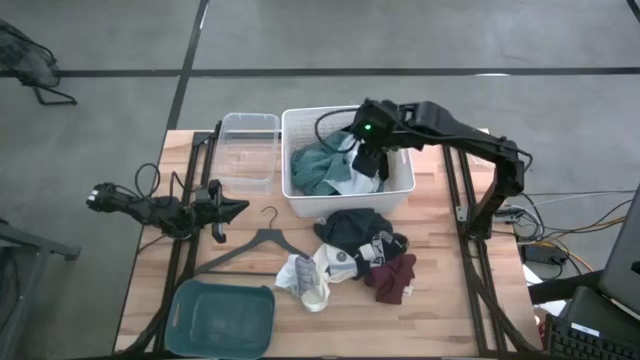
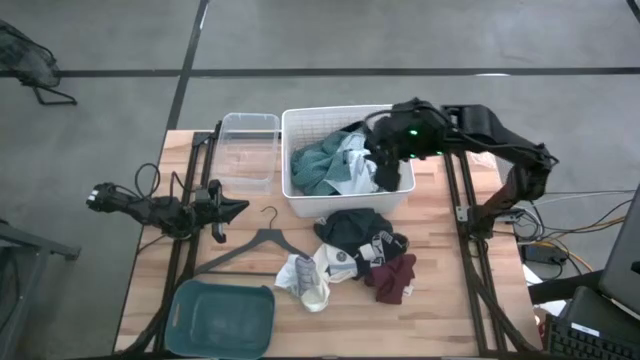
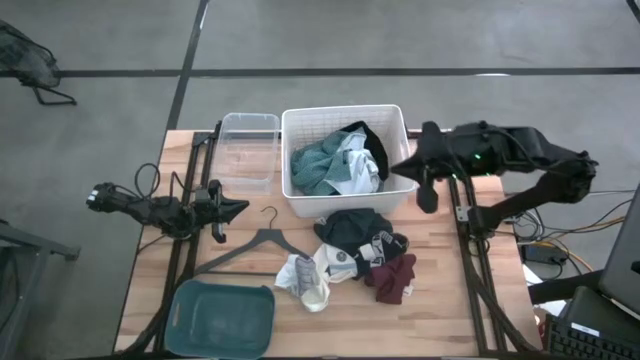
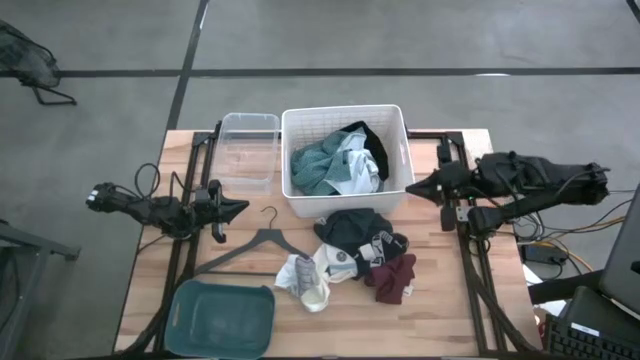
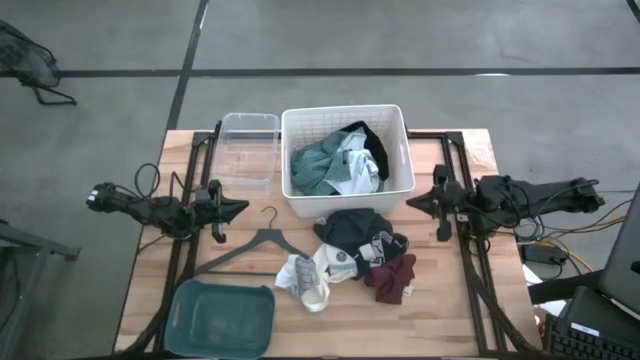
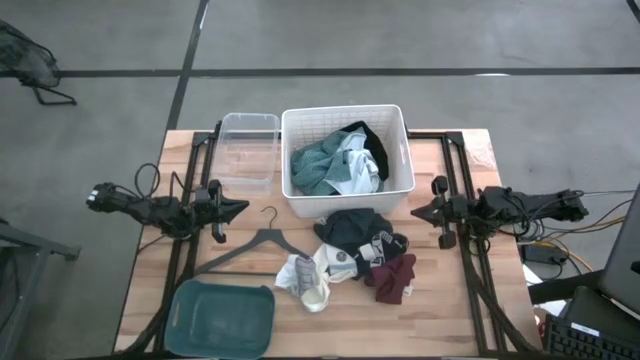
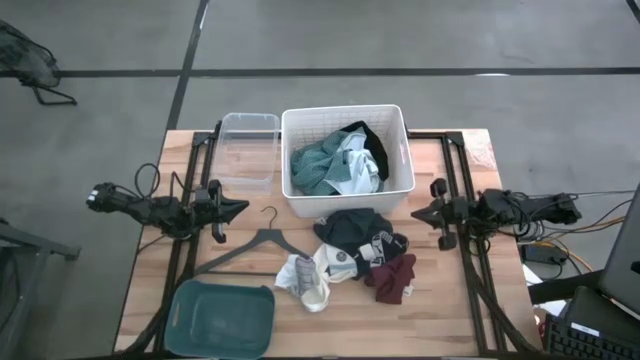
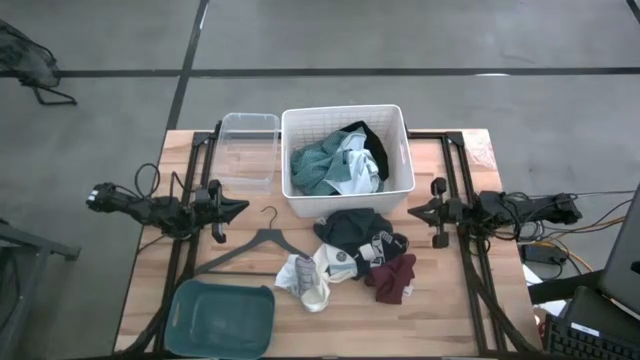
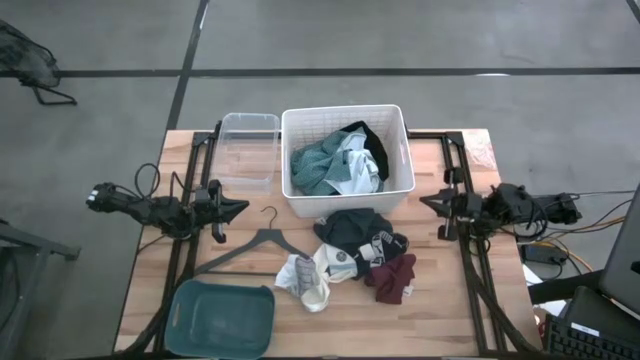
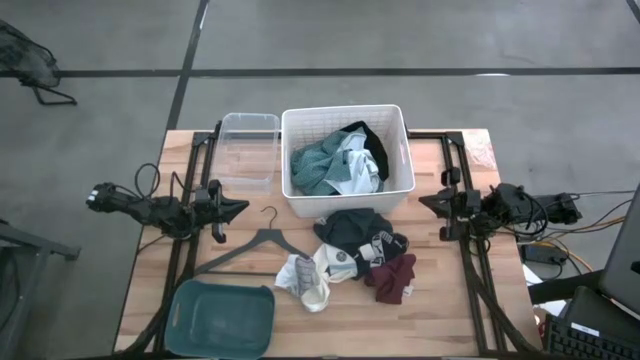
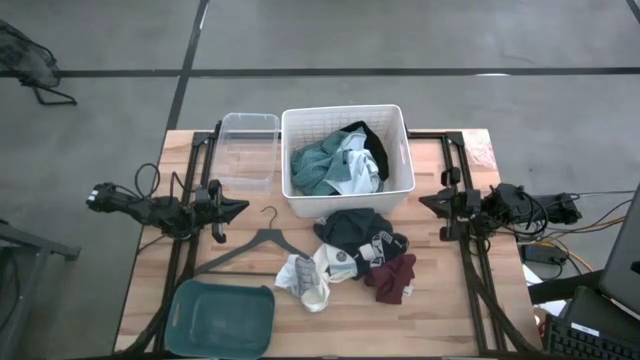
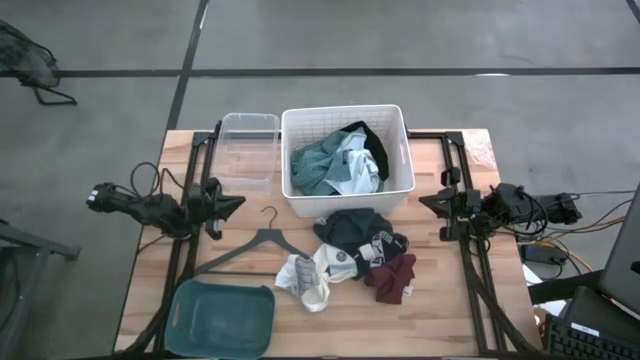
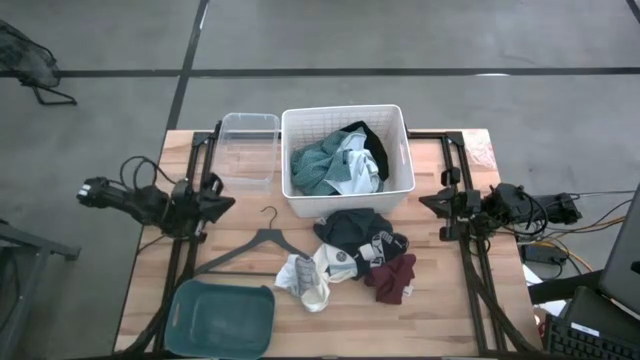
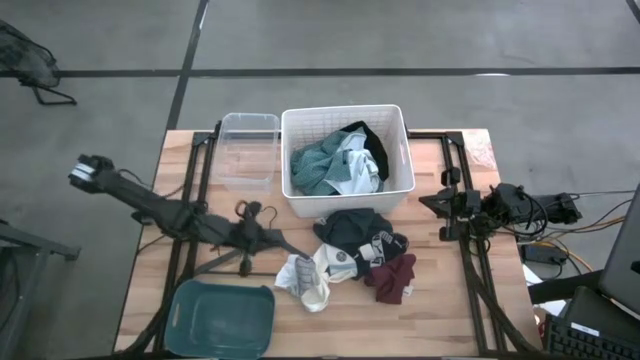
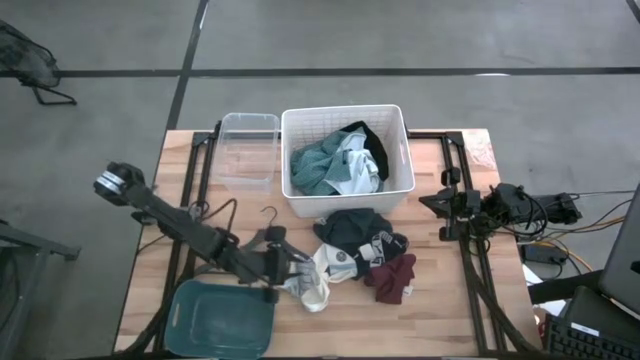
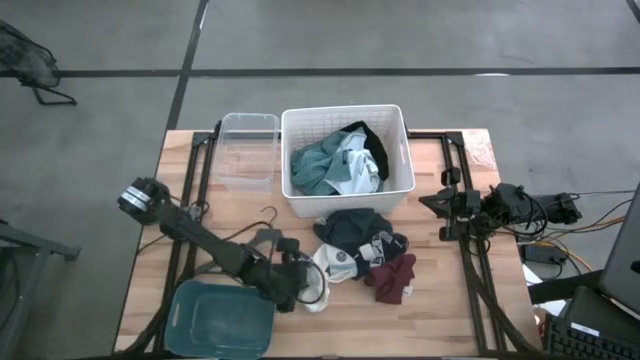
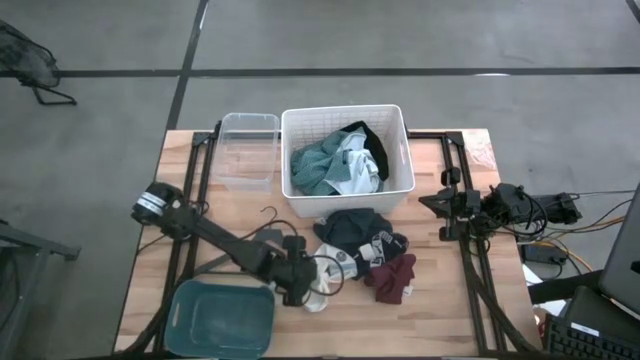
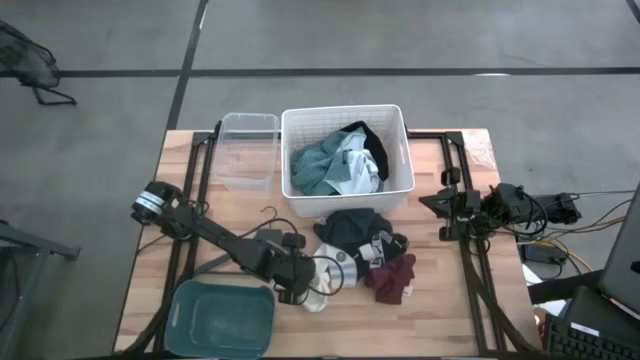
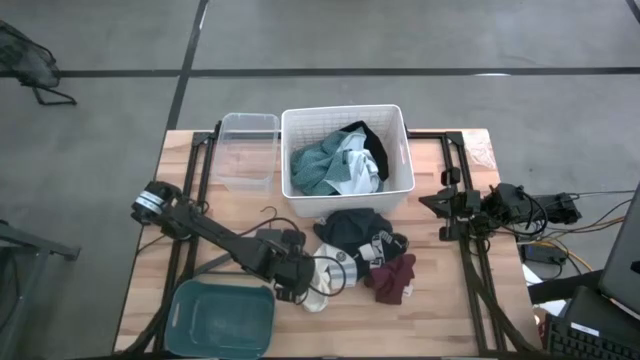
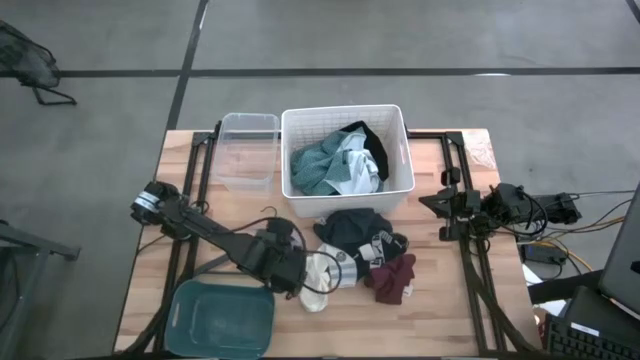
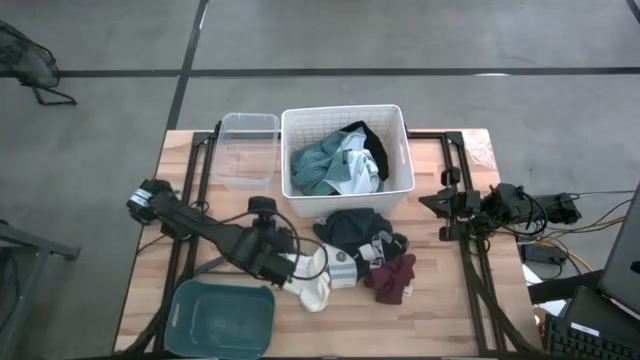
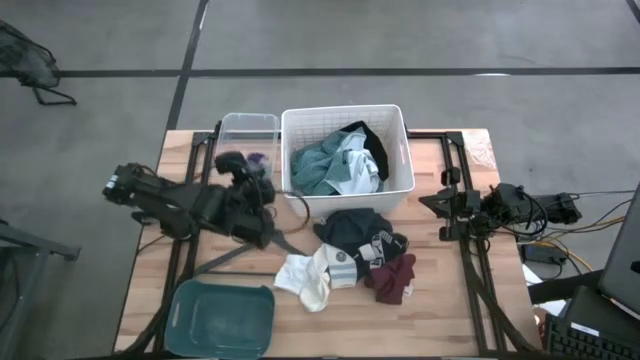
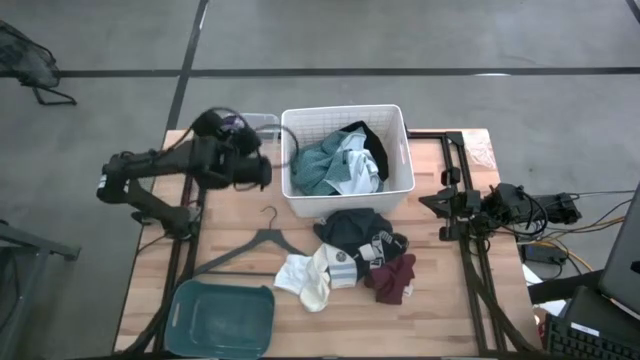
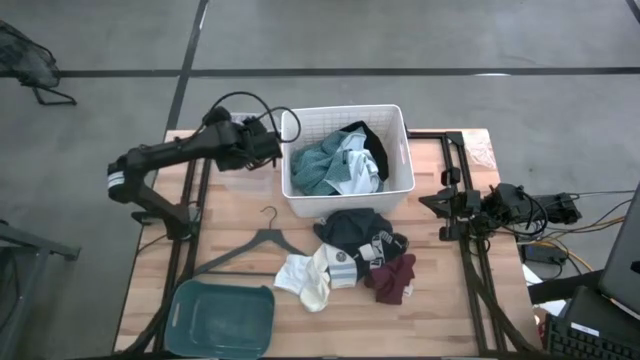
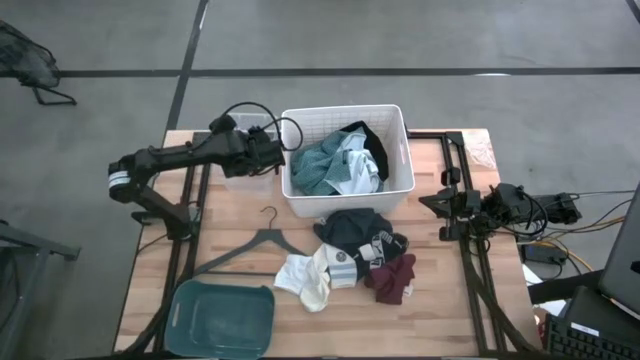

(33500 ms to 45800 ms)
Task: Pick & Place Cloths
Put the gray sock into the transparent bin

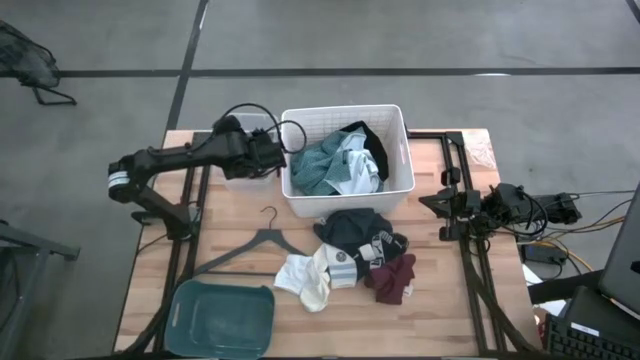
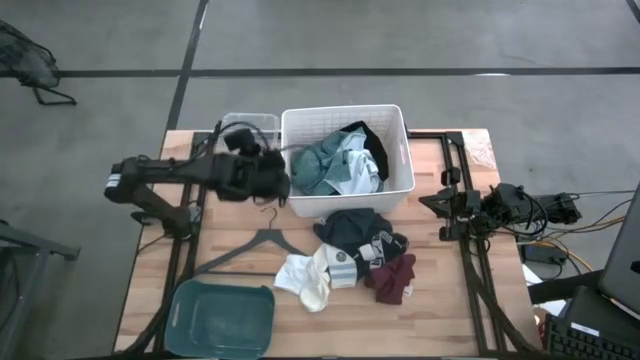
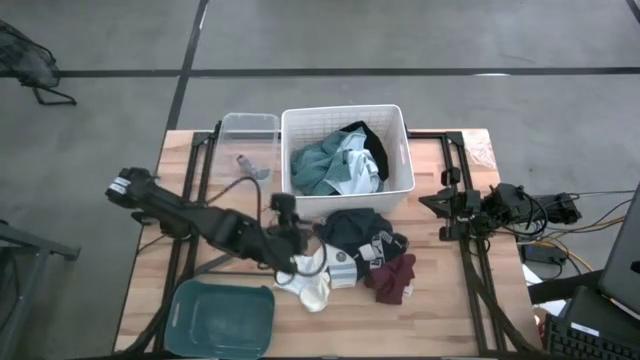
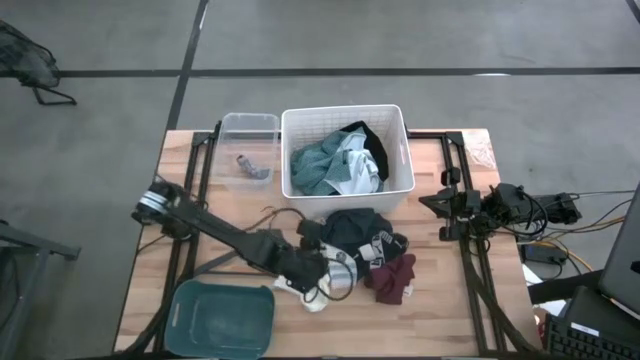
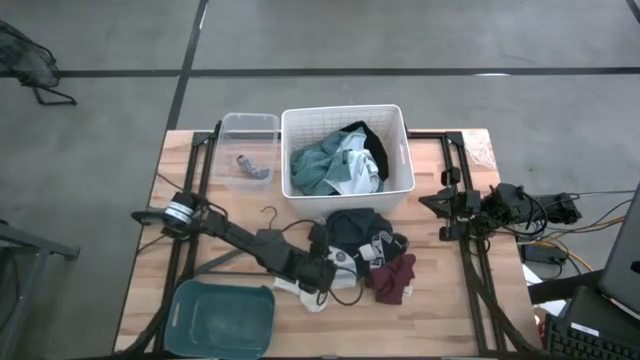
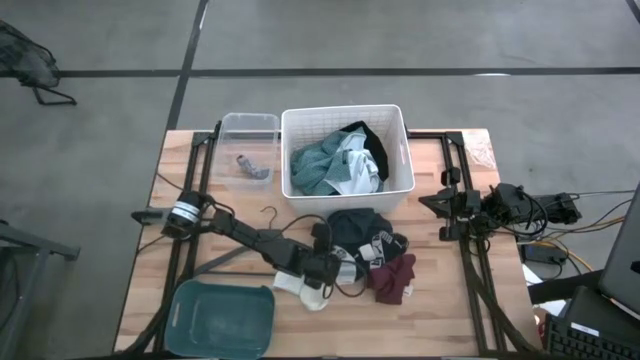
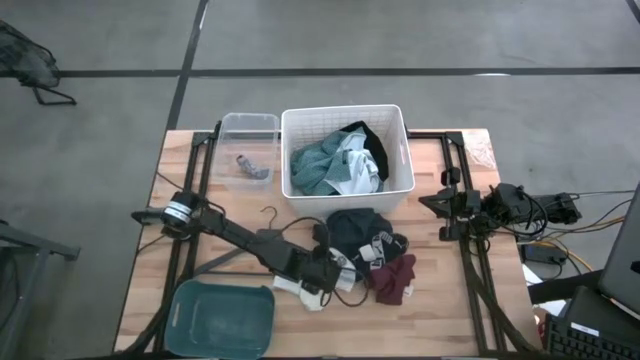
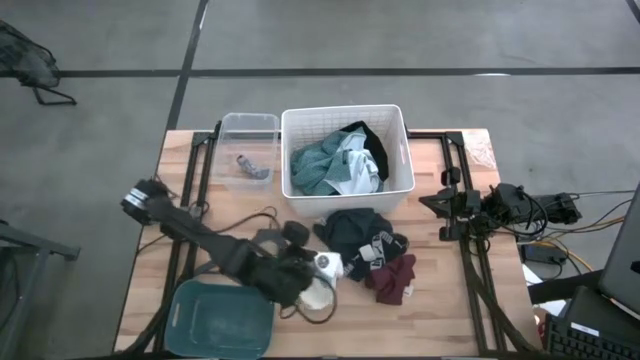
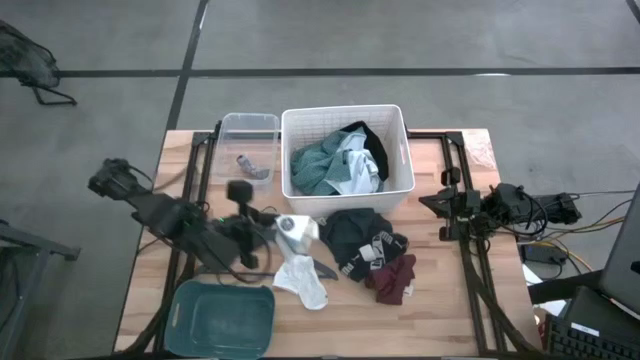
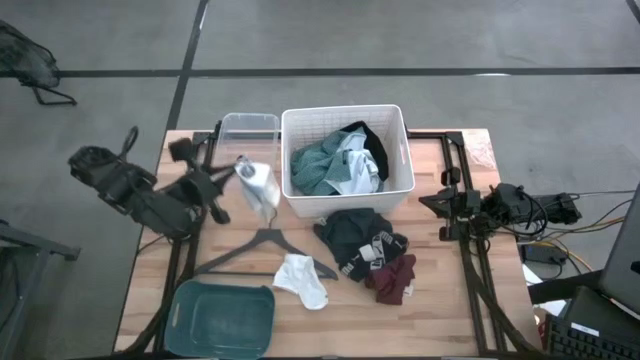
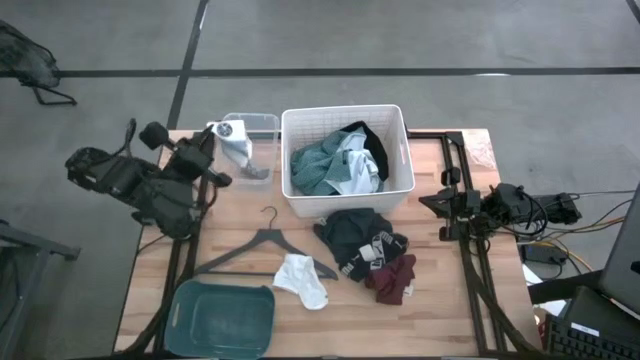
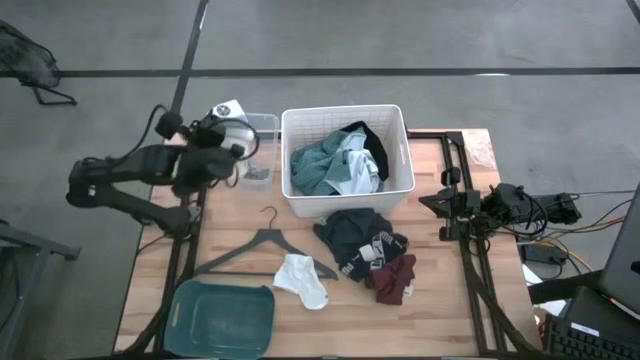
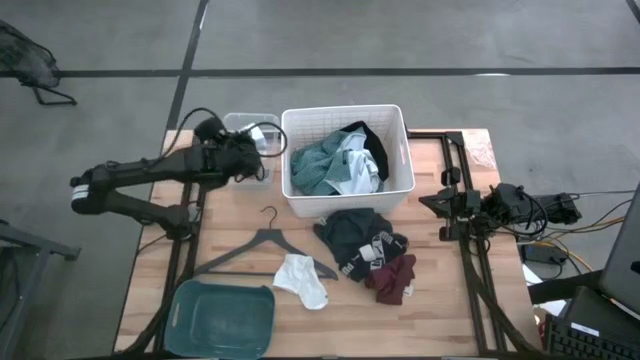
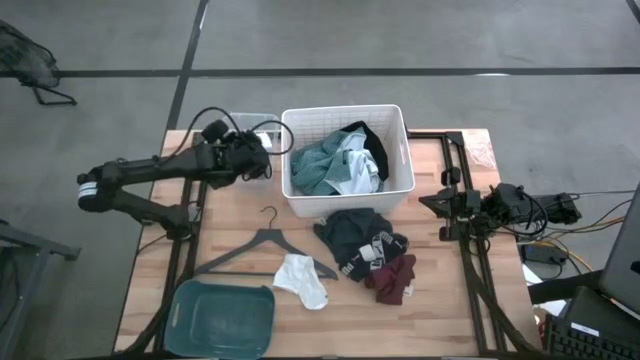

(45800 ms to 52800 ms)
Put the right white sock into the transparent bin

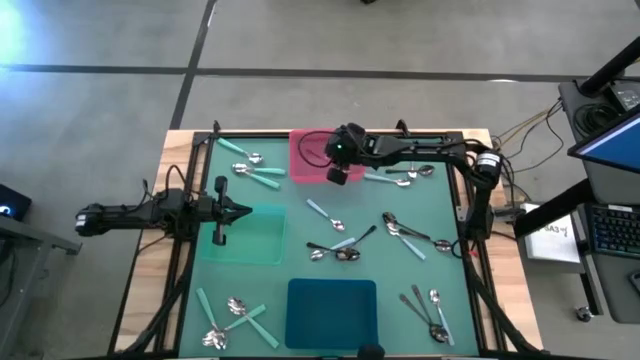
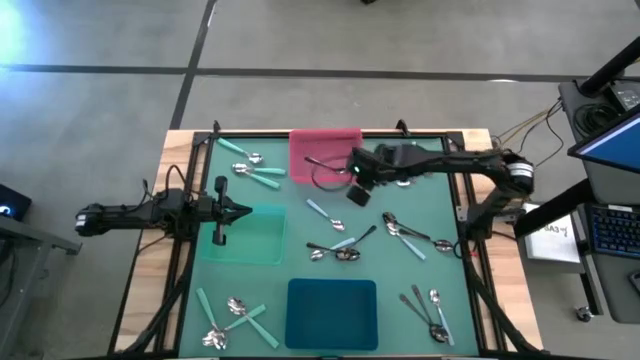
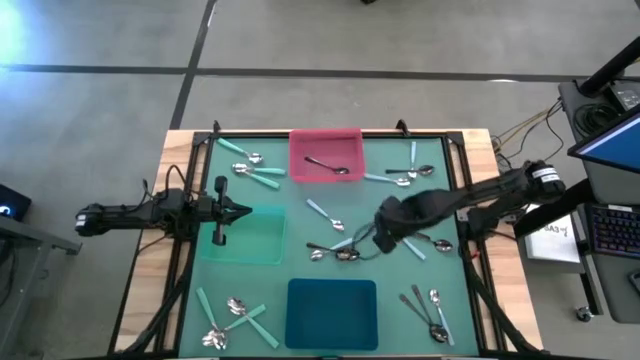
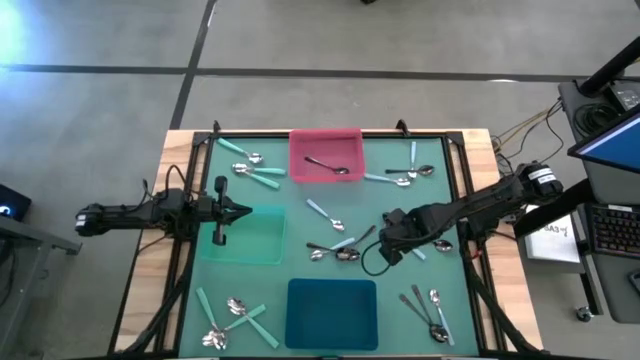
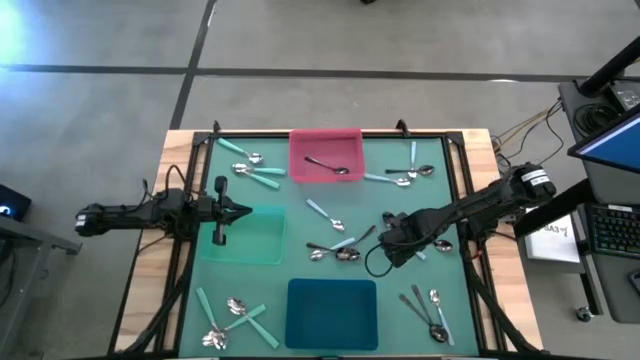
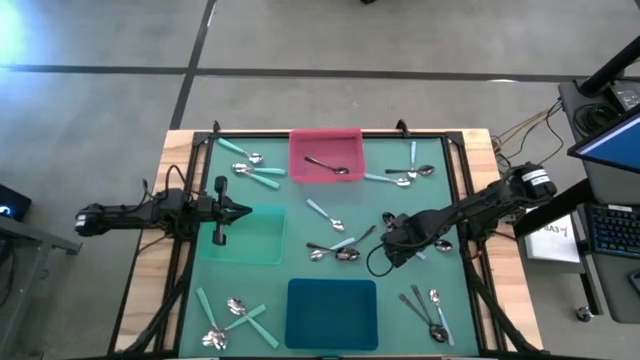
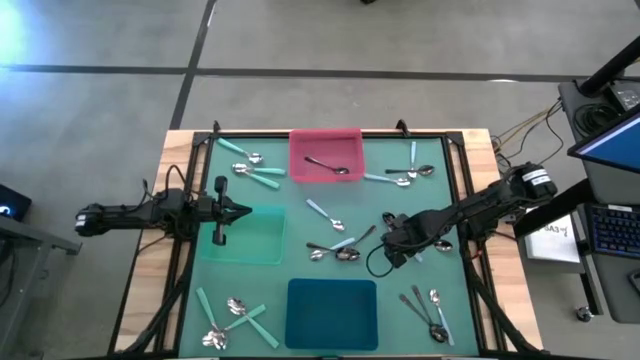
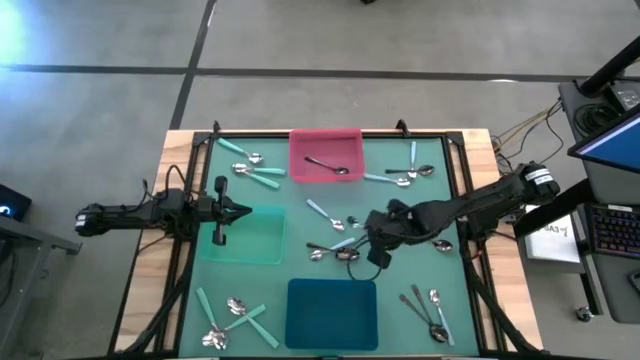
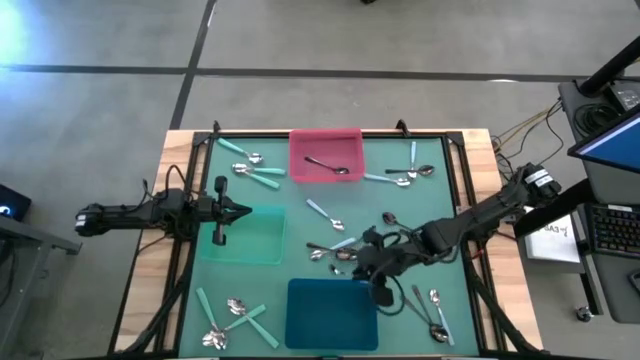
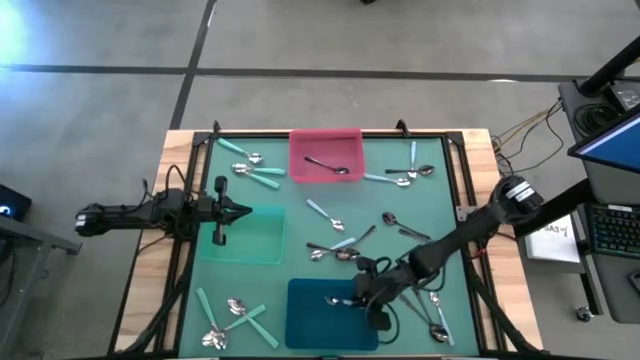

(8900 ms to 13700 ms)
Task: Sort silverware by color (type)
Put the blue spoon into the blue bin
